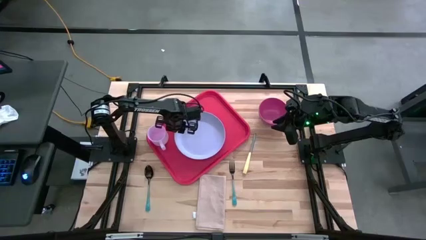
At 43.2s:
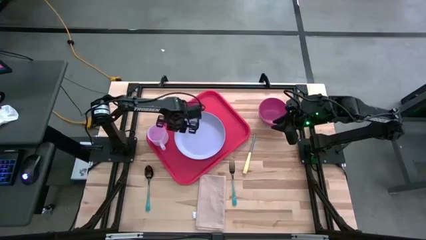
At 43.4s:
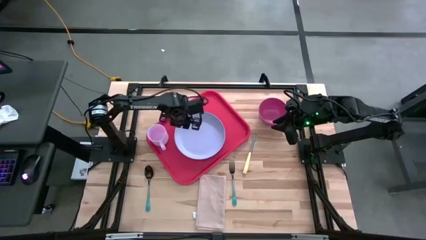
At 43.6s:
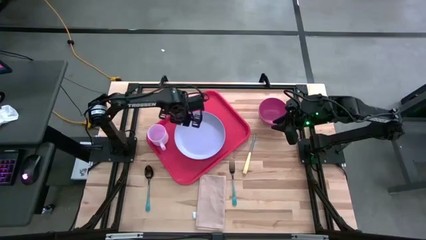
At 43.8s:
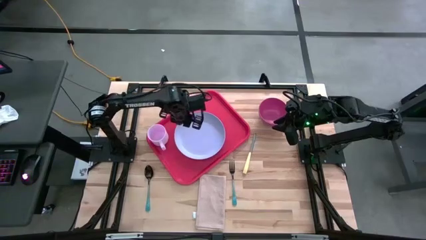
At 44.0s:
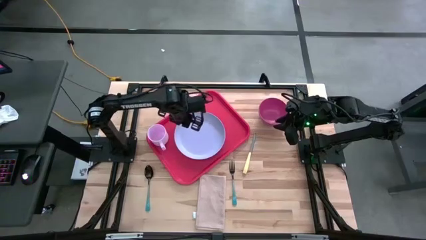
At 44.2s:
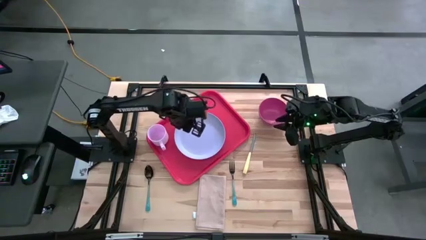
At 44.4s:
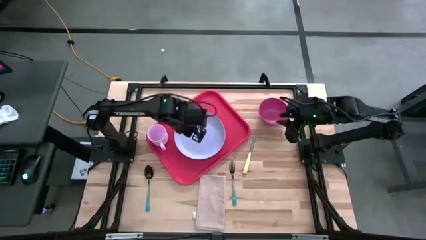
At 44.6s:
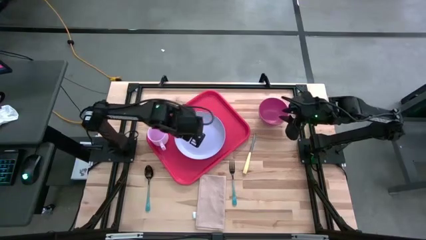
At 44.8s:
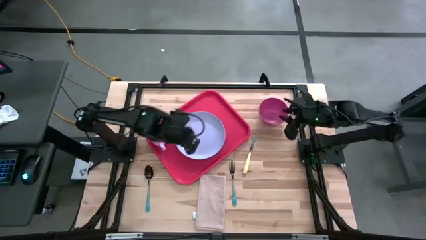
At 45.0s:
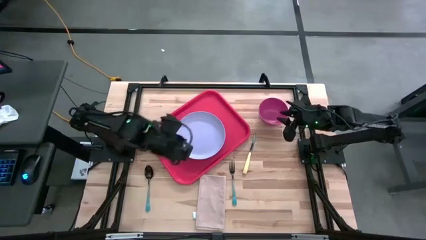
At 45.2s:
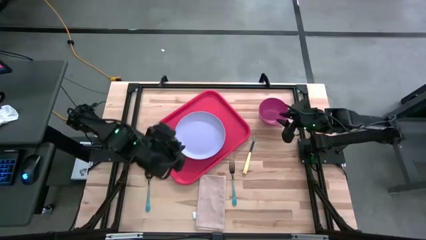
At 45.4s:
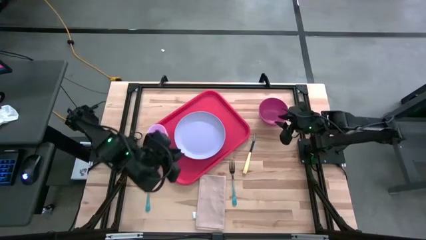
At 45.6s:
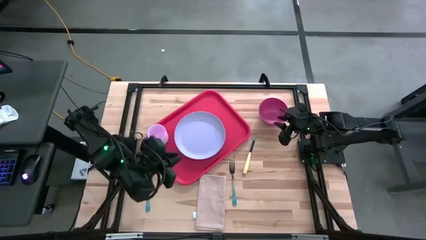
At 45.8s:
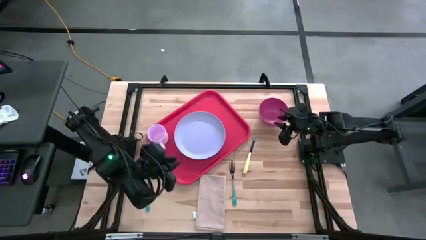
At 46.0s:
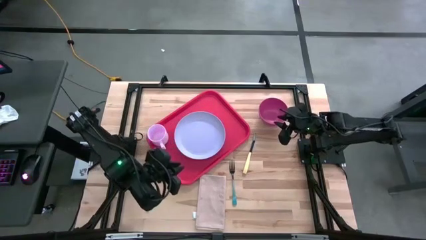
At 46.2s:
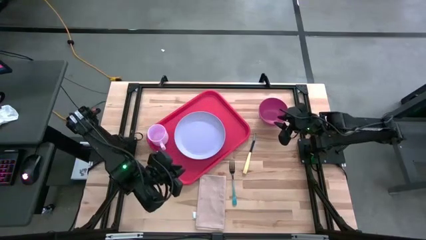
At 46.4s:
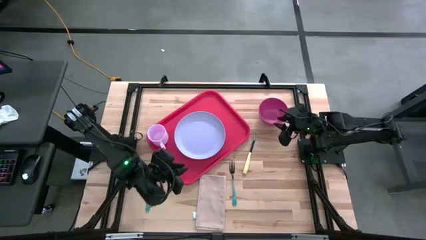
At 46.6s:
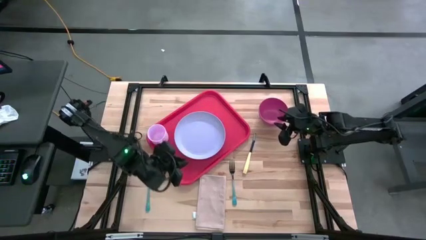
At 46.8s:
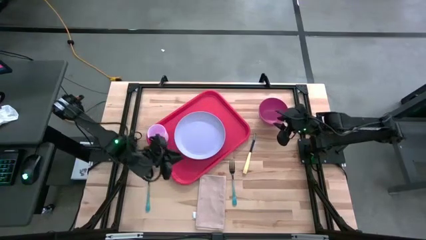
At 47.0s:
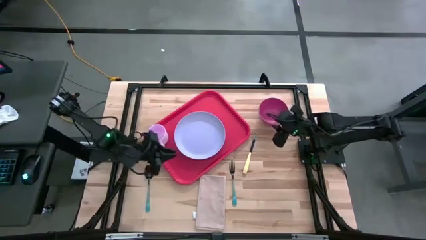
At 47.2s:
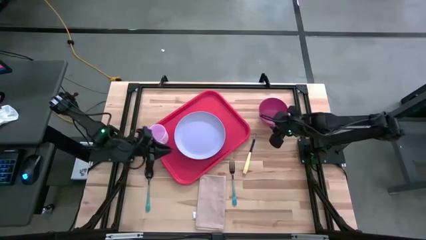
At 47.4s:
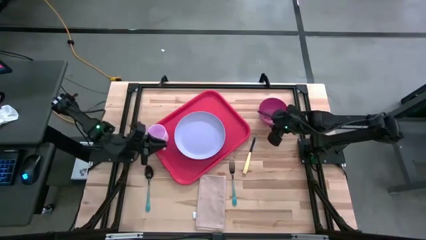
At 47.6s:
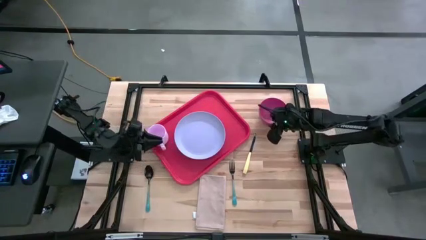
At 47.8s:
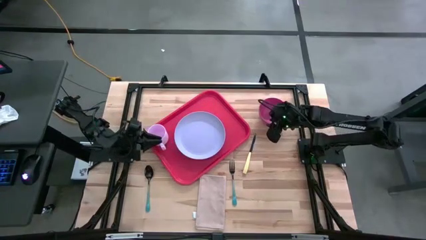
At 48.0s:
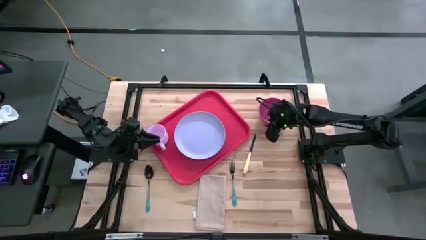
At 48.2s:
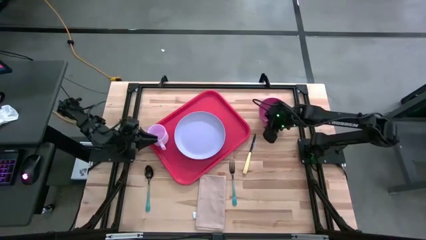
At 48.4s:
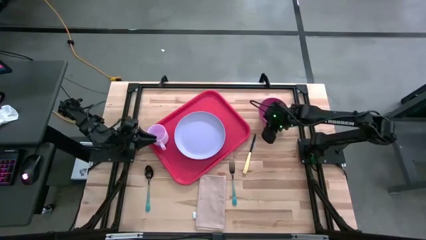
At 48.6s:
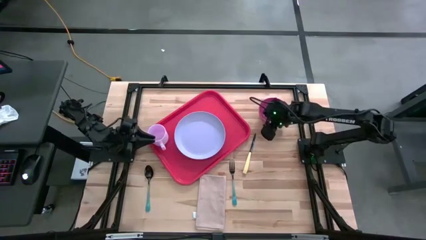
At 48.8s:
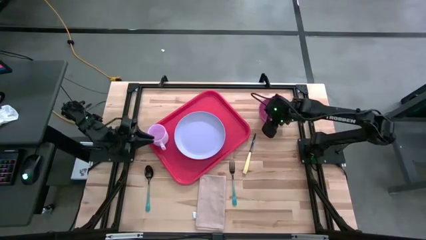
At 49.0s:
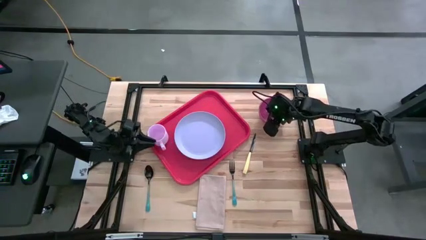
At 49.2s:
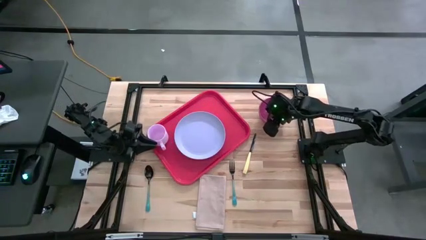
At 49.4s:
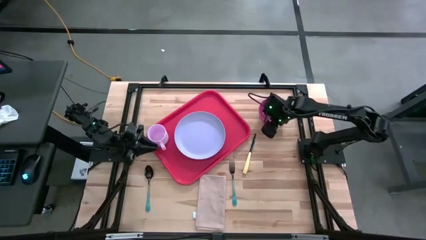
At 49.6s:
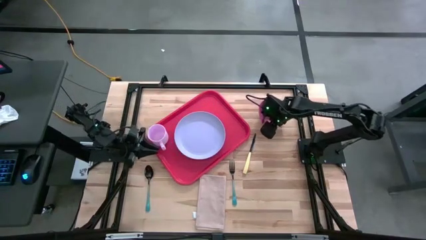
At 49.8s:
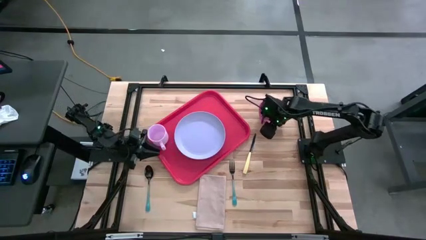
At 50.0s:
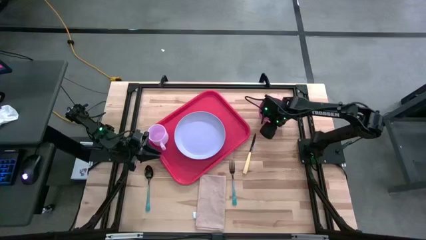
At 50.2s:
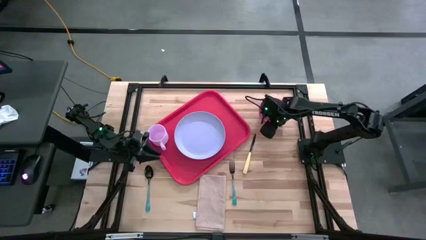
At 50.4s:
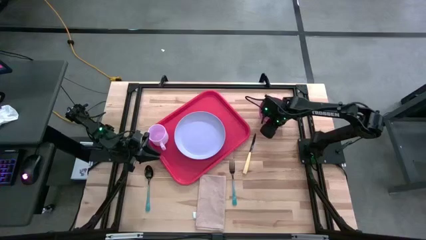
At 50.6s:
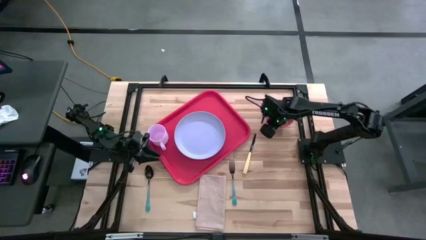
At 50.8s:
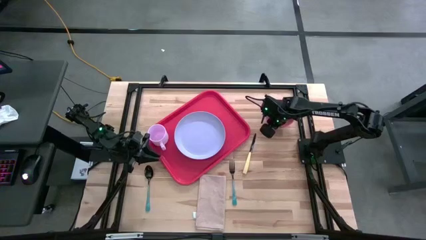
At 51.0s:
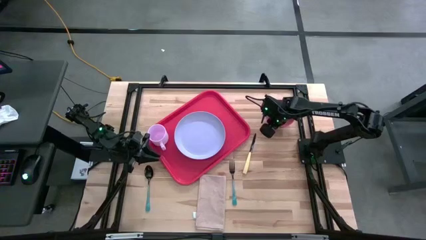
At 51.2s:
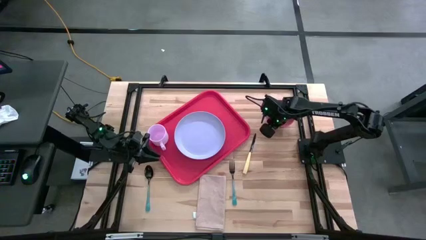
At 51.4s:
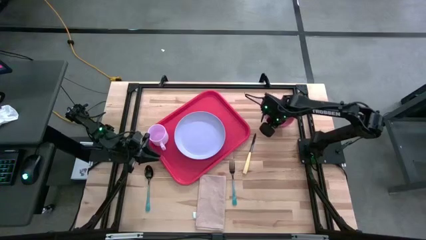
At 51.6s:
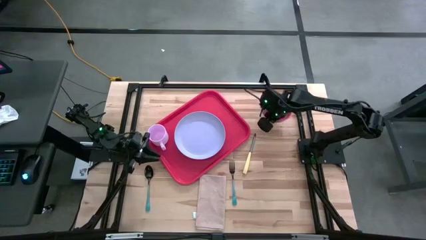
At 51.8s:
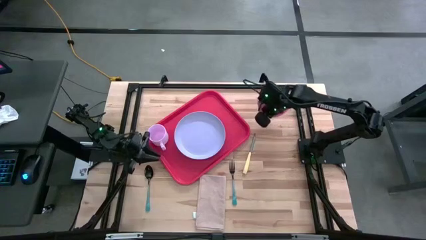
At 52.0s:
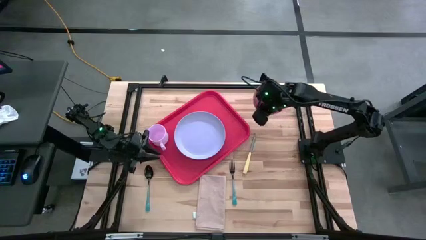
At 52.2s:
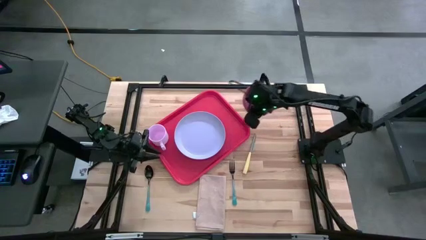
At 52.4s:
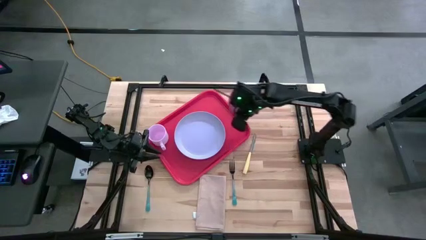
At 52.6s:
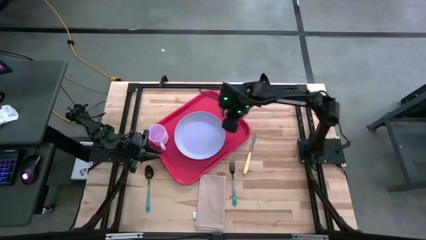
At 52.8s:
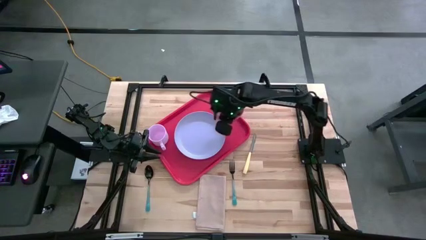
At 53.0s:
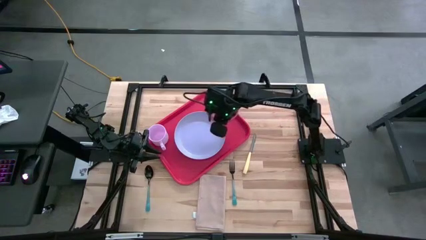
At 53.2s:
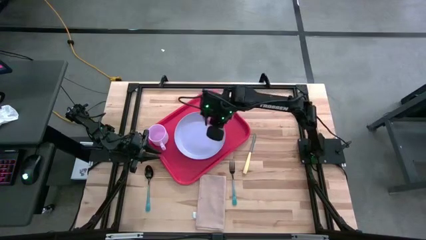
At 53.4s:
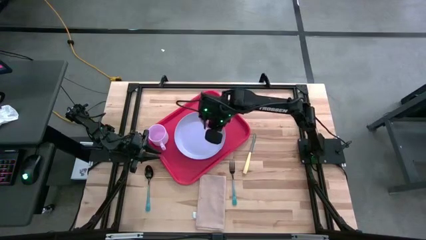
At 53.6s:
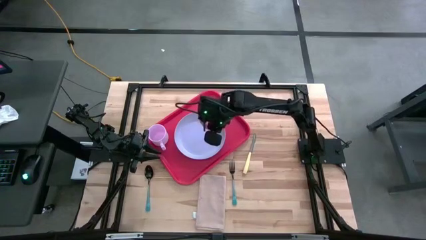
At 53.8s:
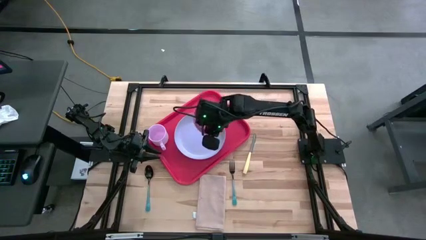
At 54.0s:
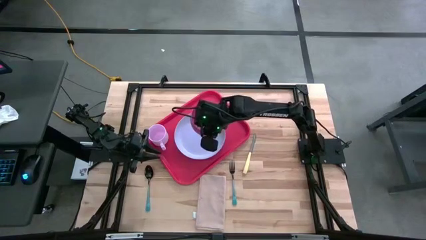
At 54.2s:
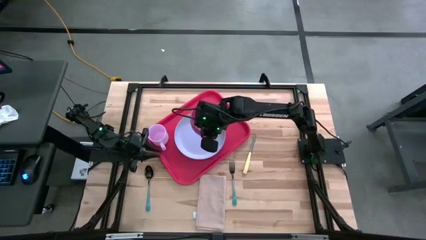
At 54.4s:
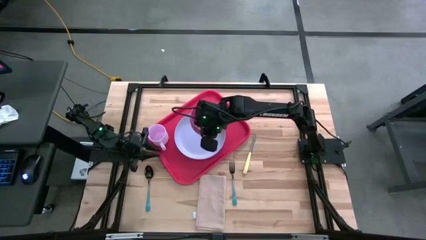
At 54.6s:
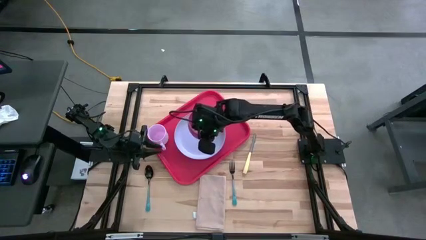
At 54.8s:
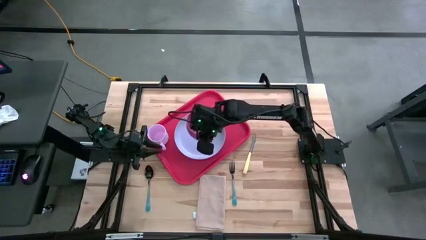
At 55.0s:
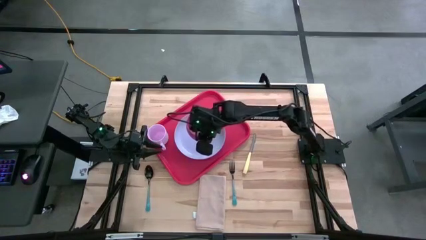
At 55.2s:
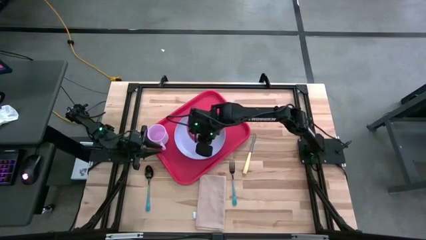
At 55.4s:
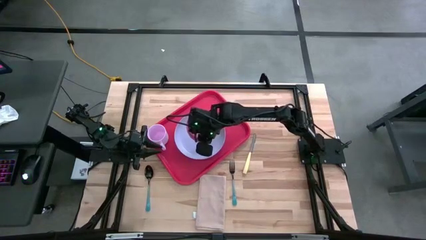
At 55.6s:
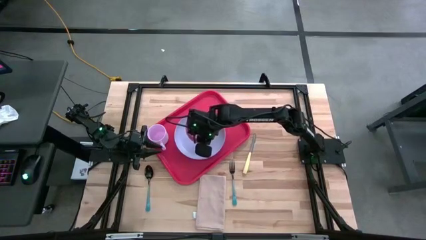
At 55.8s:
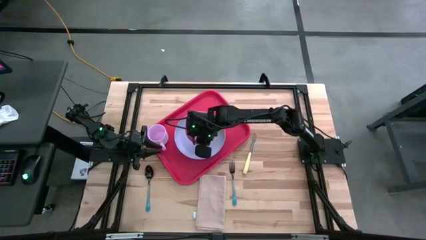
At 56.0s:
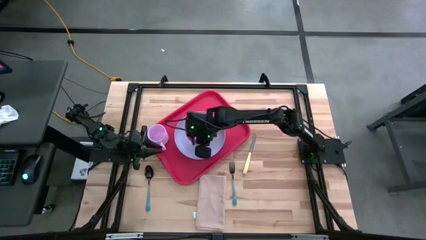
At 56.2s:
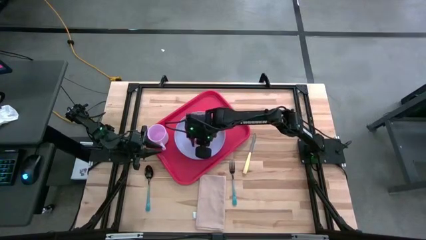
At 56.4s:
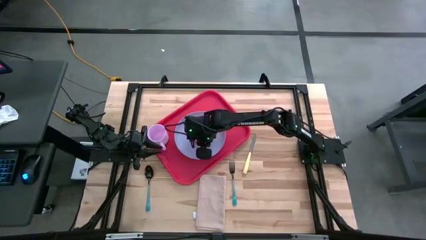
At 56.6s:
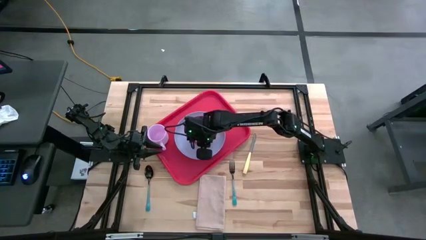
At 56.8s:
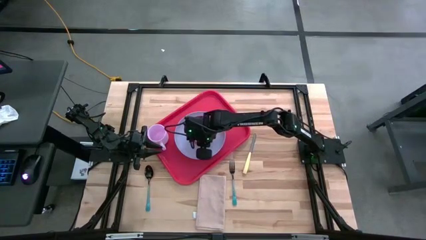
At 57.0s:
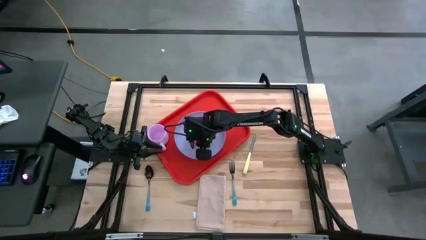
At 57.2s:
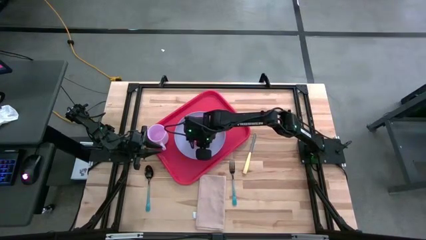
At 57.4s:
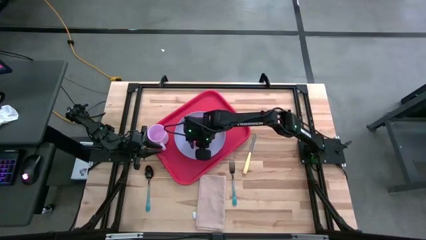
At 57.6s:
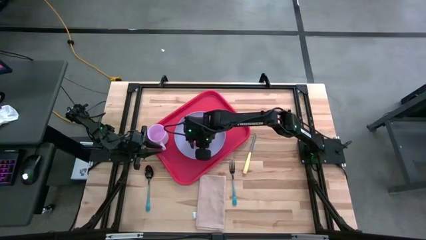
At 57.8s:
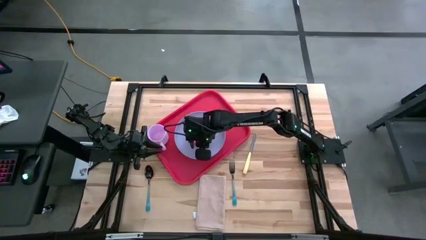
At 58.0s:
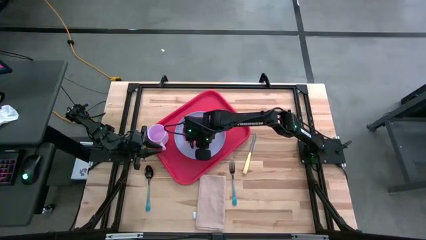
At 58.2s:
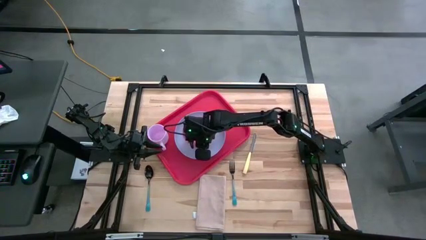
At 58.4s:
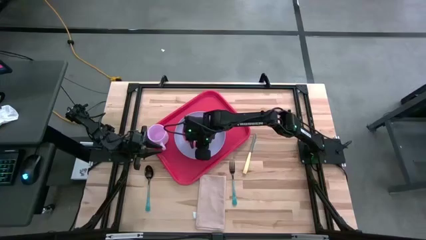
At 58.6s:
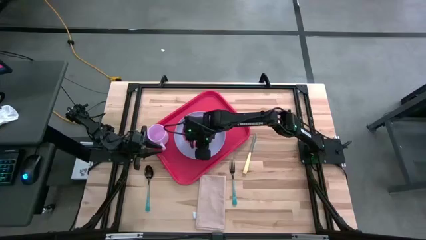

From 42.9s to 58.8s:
Task: Set up tray
Put the pink bowl on top of the white plate on the red serving tray
